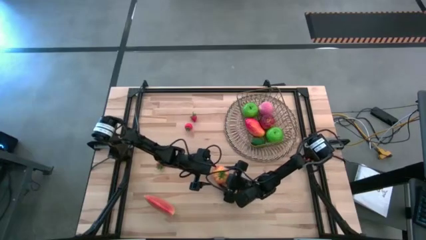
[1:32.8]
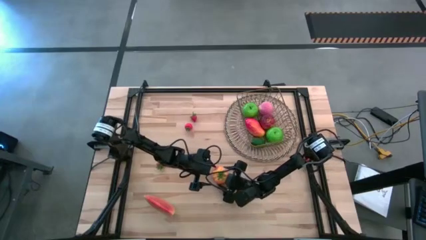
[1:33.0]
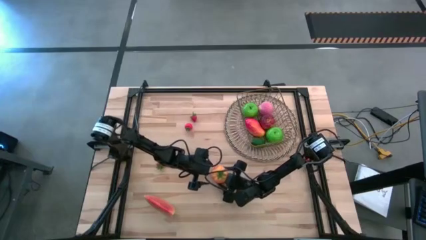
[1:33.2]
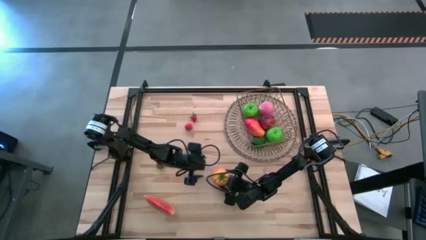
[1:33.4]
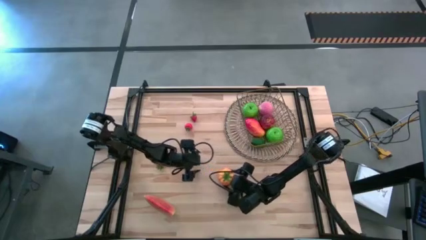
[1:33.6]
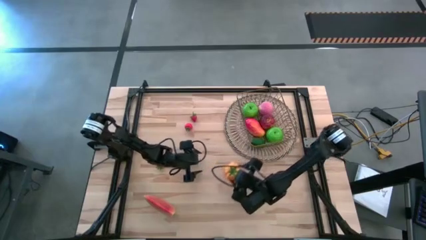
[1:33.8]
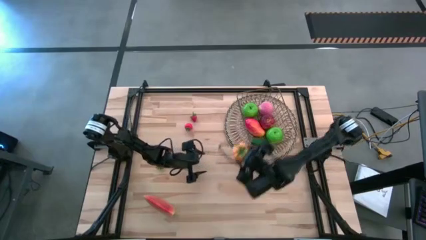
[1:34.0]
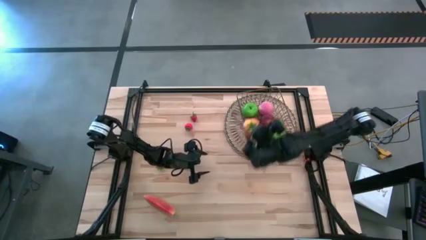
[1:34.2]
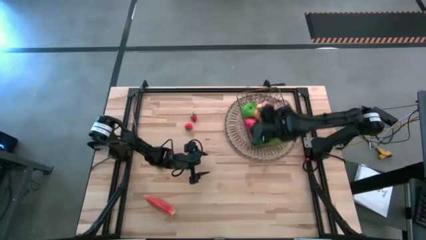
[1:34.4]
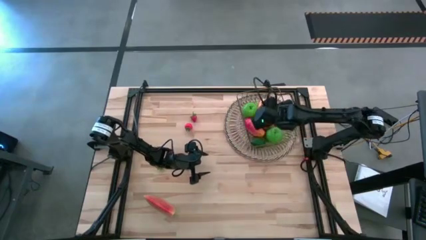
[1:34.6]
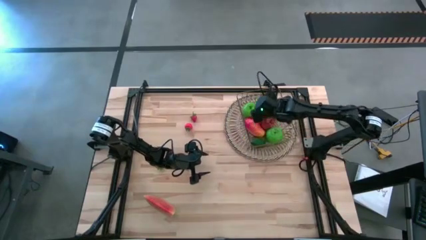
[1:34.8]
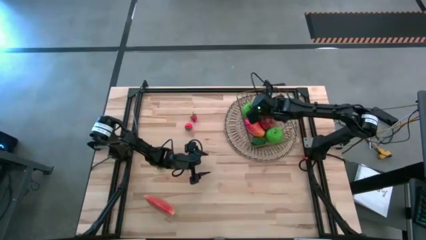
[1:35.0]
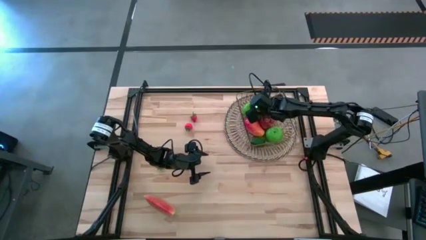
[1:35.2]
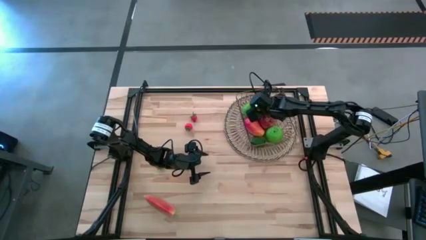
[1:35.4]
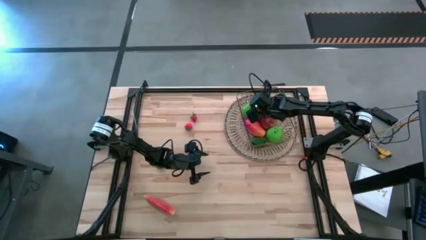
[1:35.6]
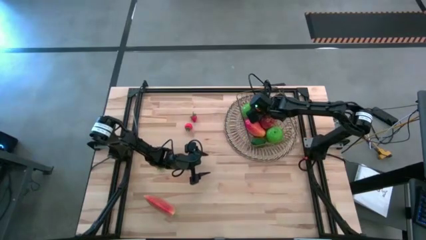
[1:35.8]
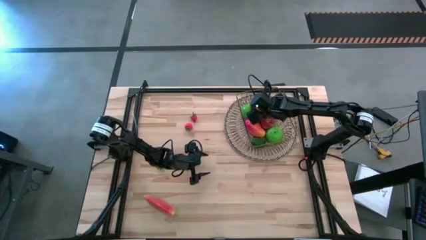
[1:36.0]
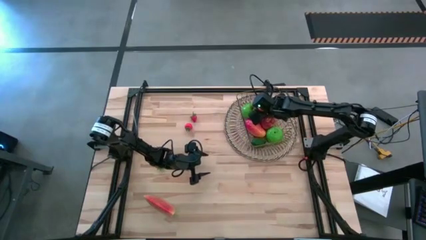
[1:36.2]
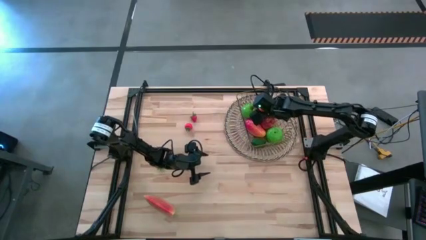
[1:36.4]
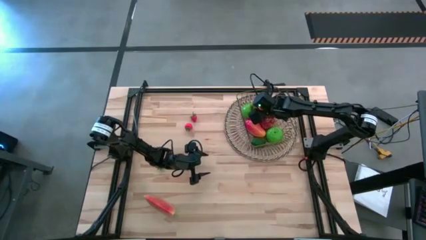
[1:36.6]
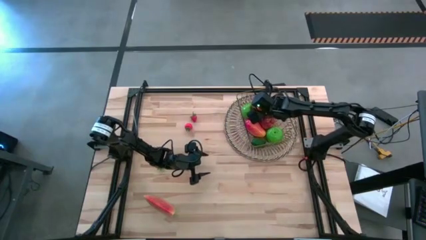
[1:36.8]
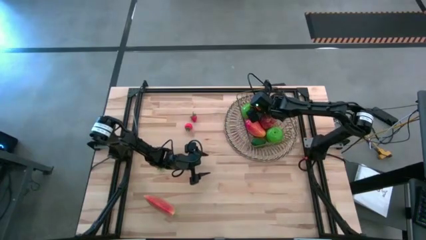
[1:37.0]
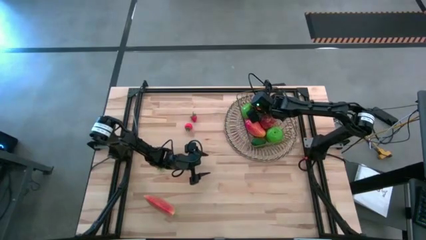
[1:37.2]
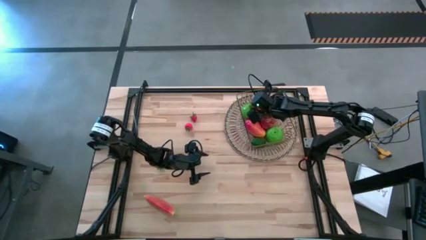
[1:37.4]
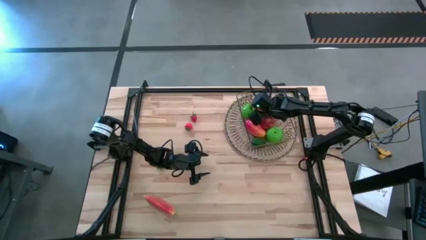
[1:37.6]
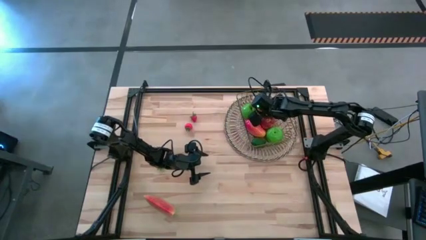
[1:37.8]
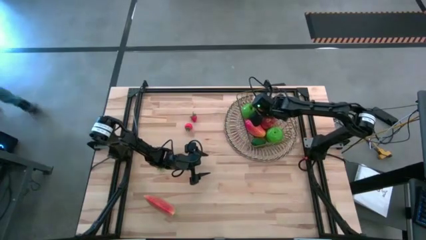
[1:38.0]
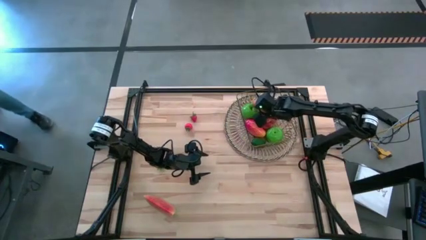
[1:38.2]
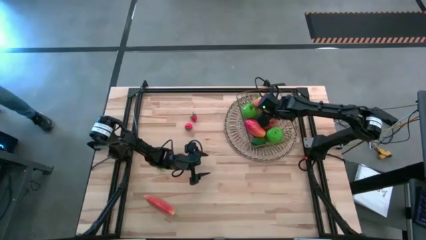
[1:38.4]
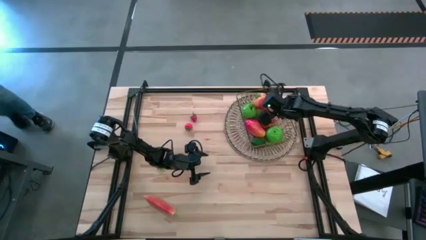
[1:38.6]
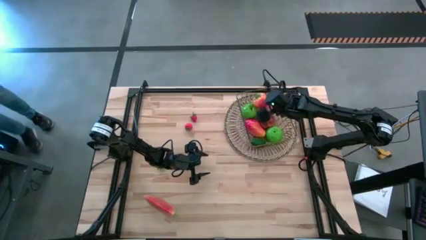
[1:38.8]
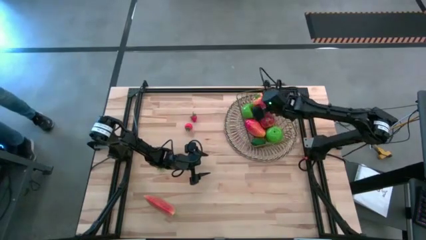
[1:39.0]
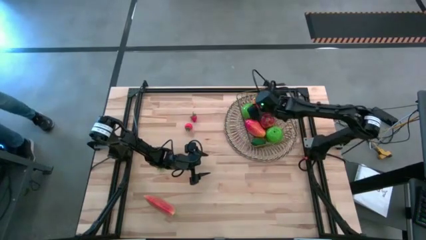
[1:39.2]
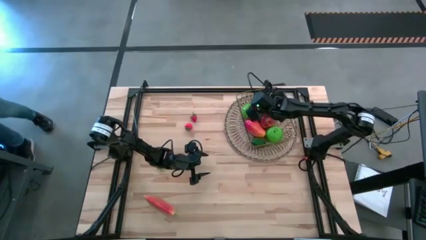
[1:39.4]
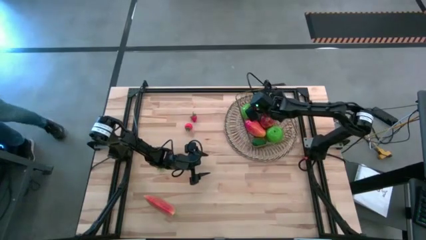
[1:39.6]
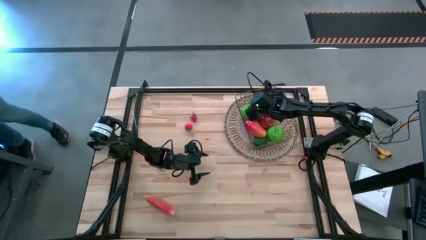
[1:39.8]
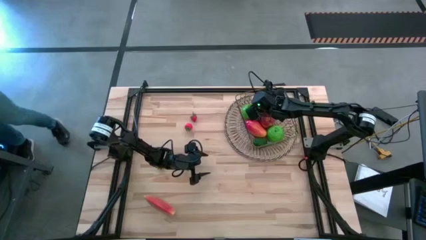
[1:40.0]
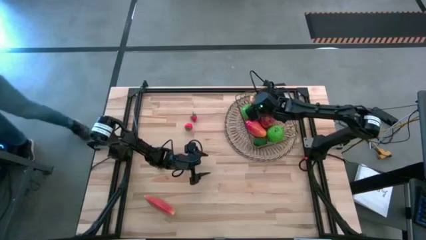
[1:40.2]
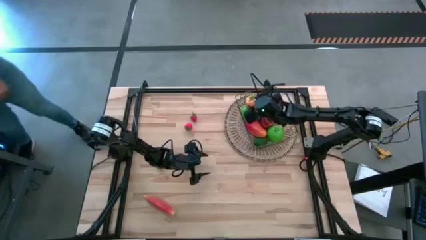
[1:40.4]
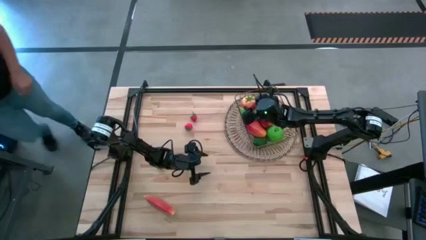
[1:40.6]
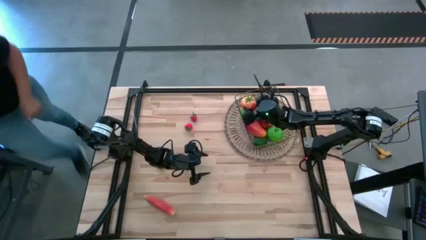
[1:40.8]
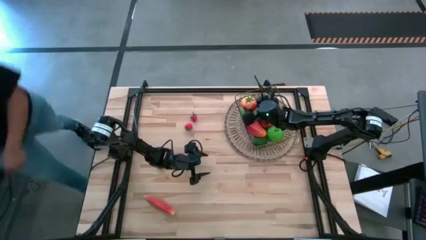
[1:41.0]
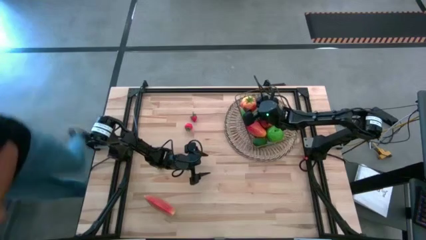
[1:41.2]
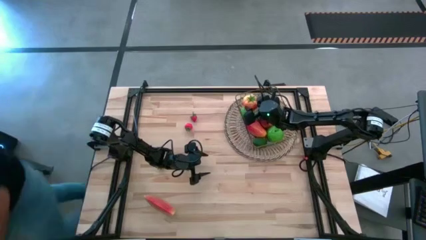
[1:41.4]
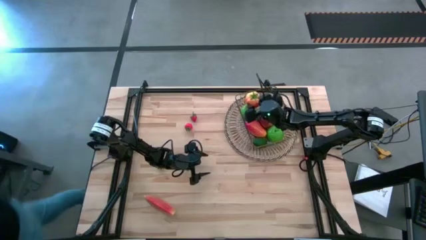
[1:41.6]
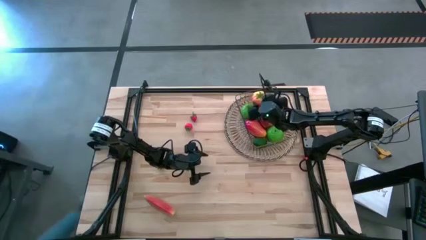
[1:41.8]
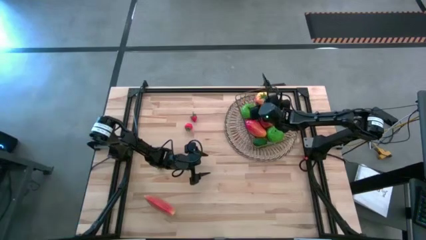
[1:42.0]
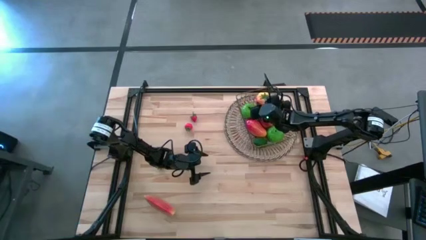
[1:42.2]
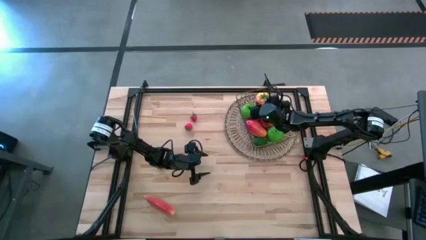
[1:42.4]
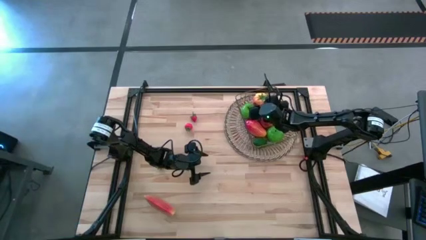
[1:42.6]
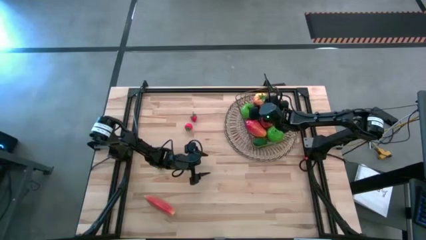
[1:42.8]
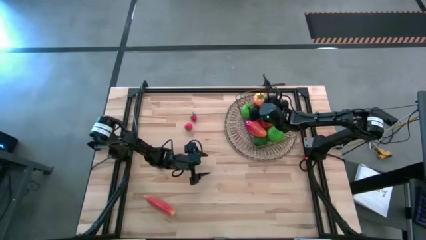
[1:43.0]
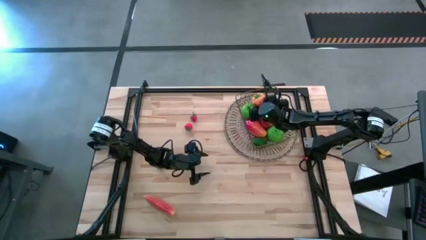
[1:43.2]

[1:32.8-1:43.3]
Task: Build produce basket
Put the persimmon into the gold wire basket
